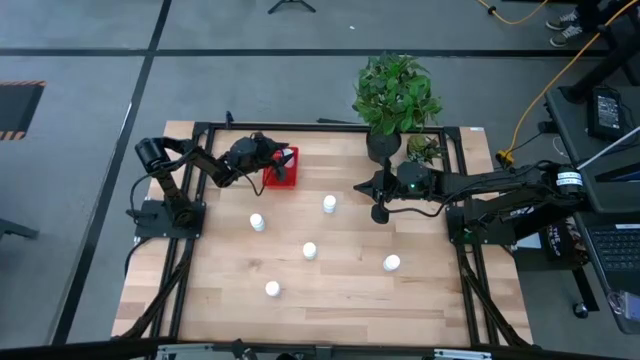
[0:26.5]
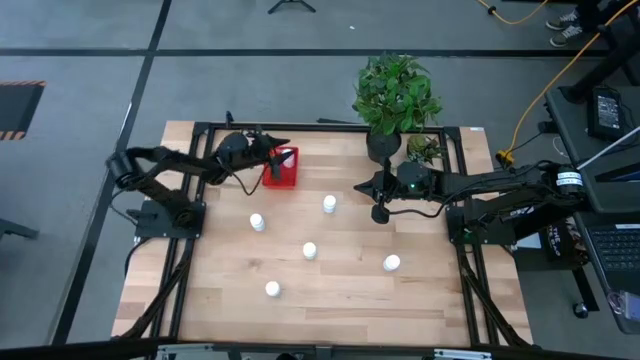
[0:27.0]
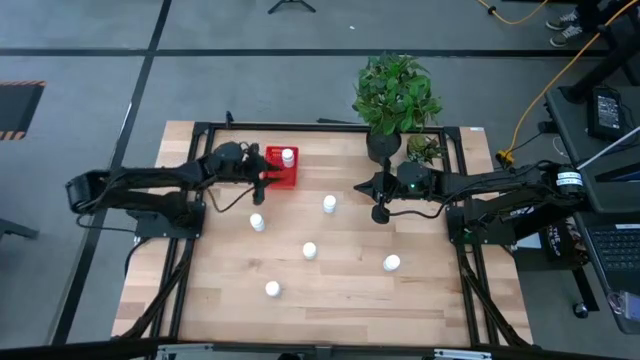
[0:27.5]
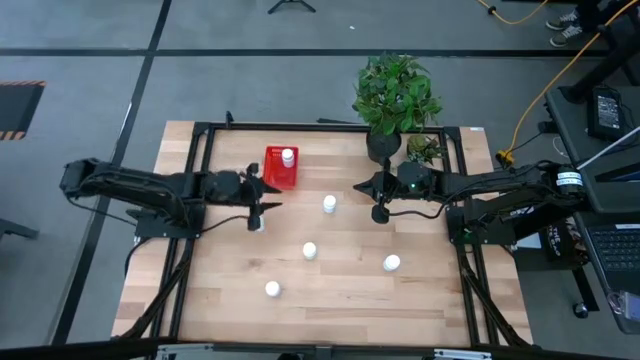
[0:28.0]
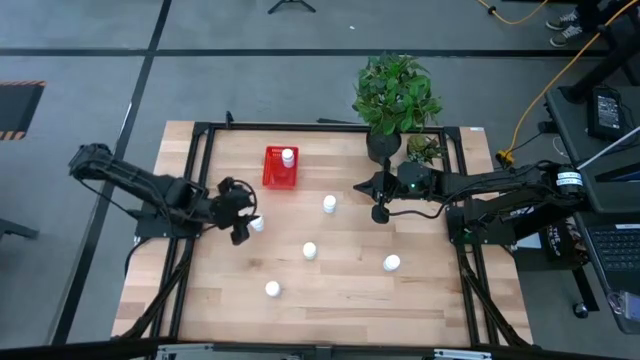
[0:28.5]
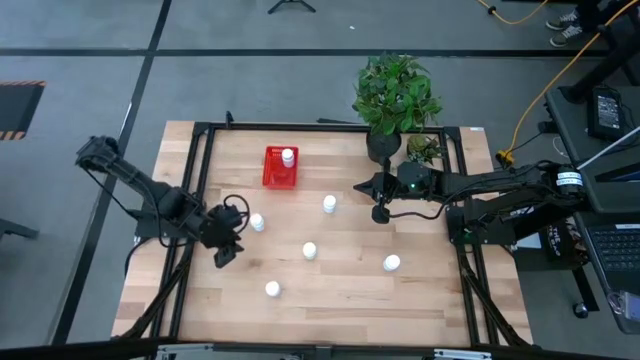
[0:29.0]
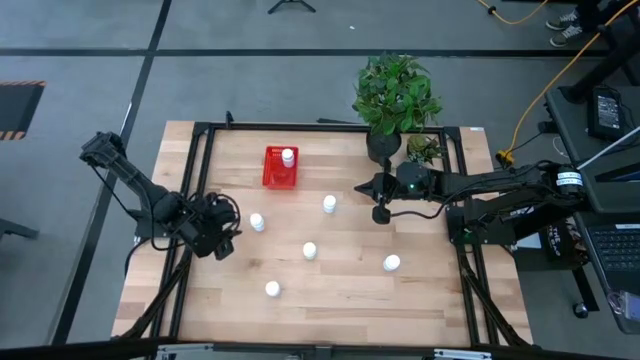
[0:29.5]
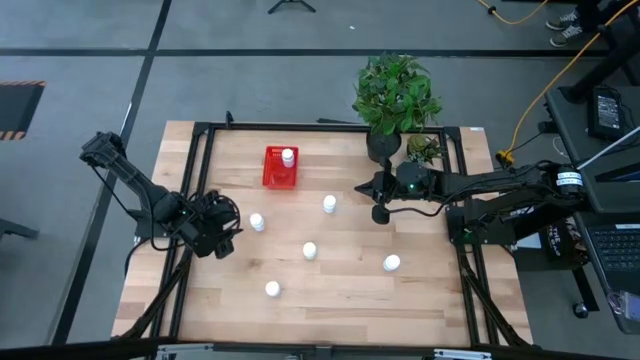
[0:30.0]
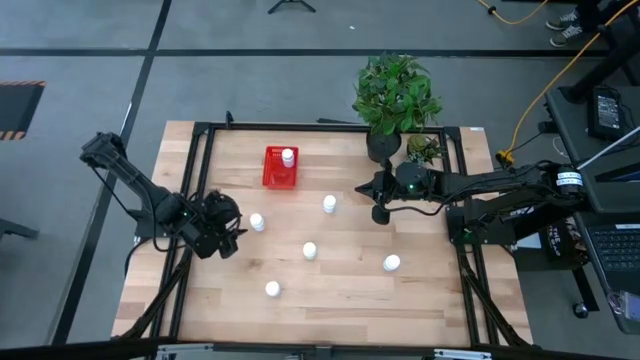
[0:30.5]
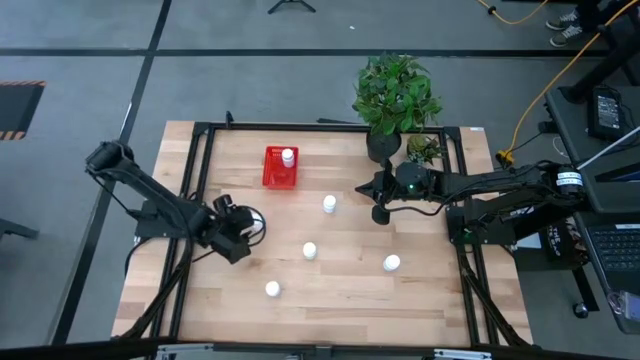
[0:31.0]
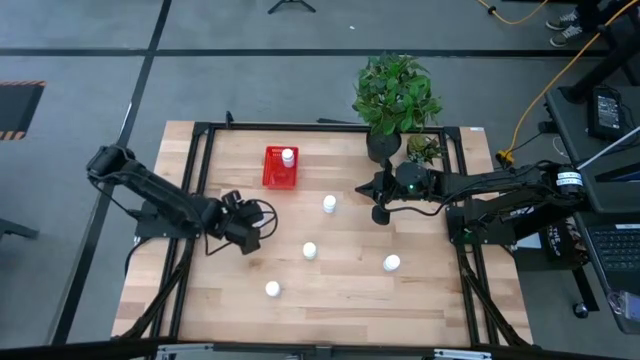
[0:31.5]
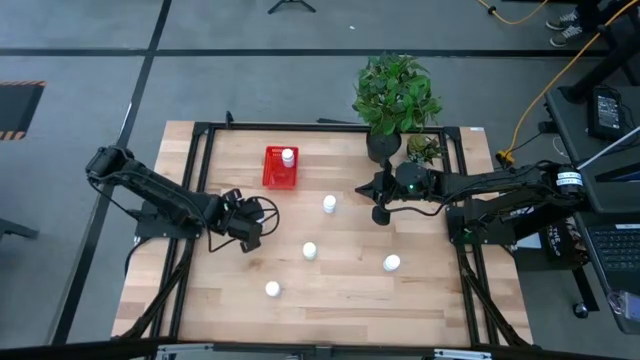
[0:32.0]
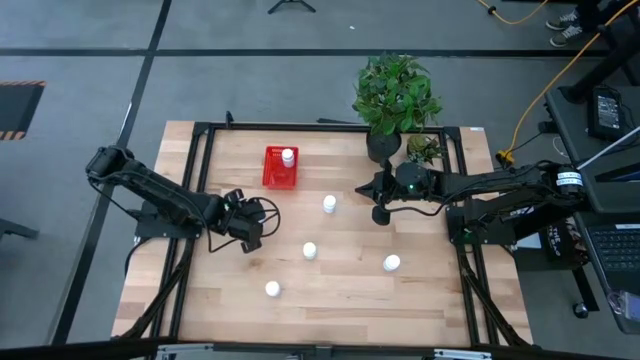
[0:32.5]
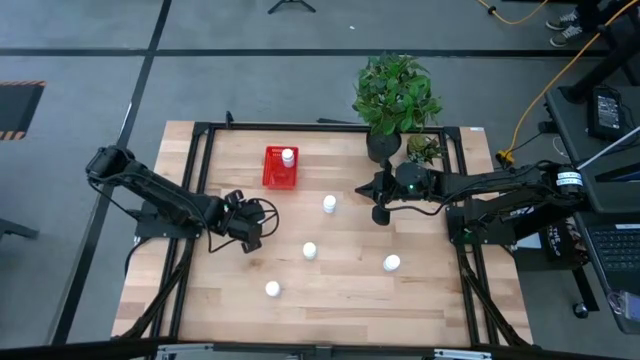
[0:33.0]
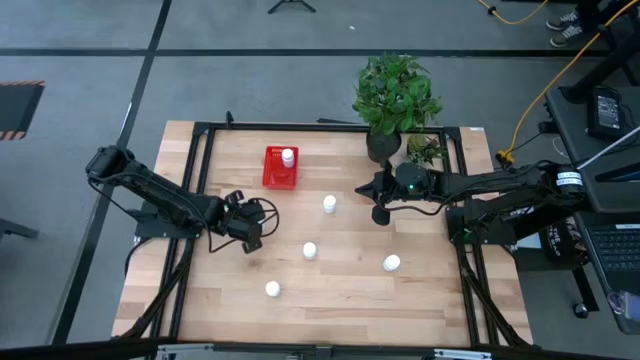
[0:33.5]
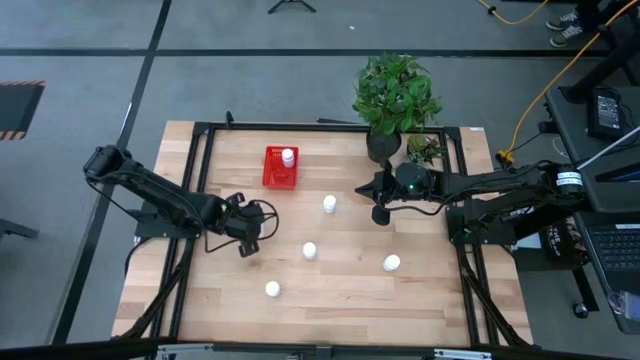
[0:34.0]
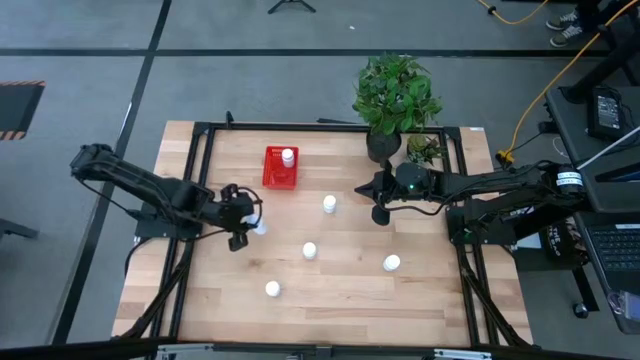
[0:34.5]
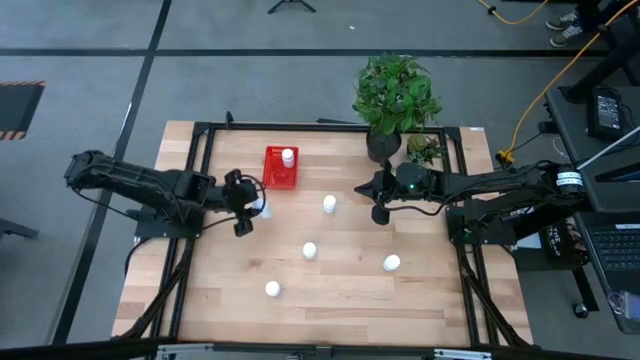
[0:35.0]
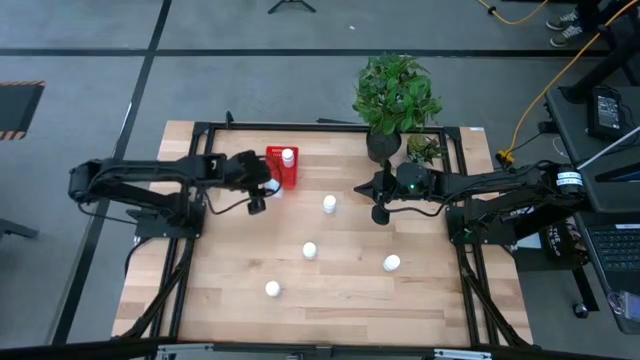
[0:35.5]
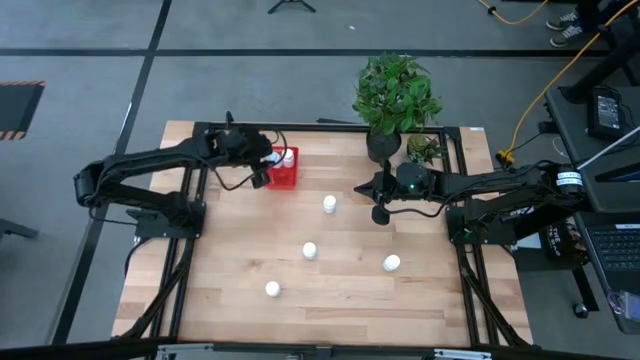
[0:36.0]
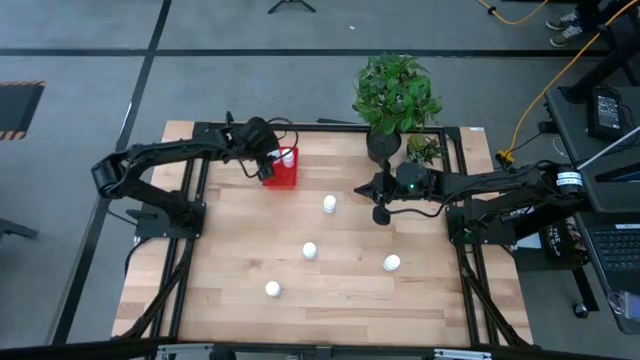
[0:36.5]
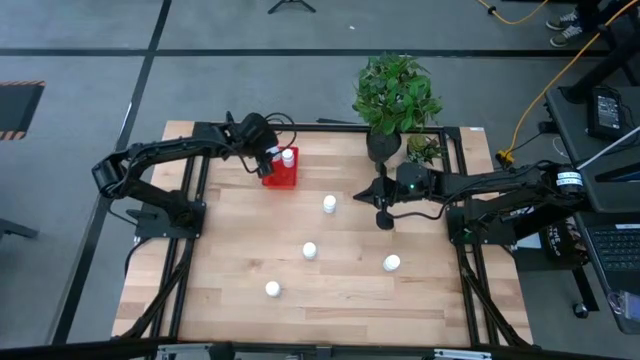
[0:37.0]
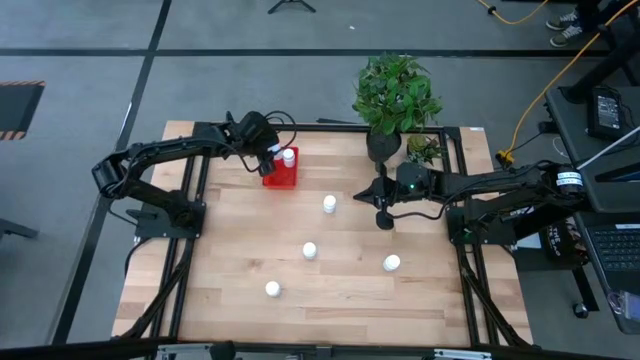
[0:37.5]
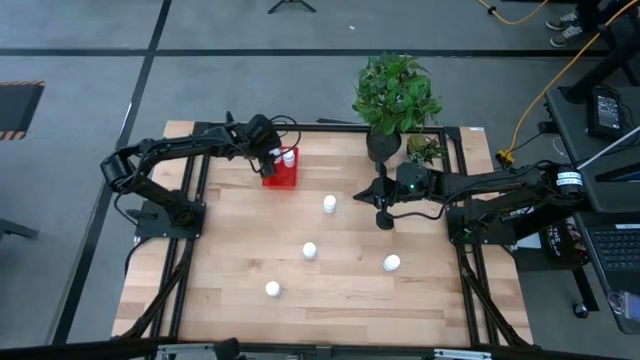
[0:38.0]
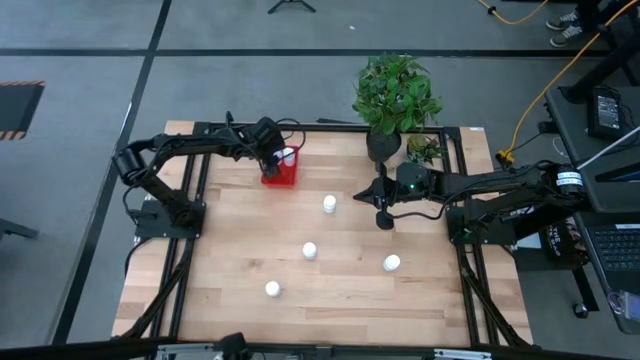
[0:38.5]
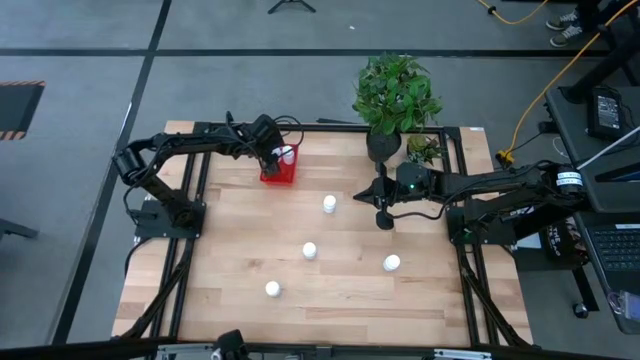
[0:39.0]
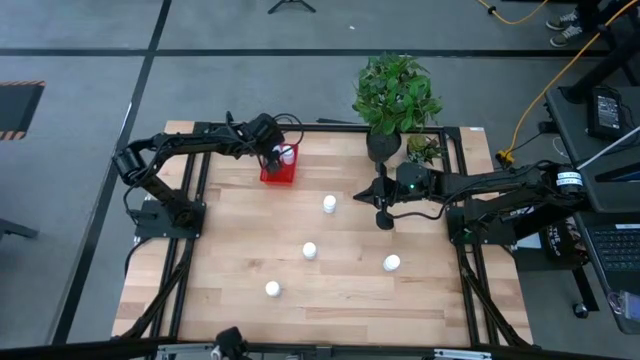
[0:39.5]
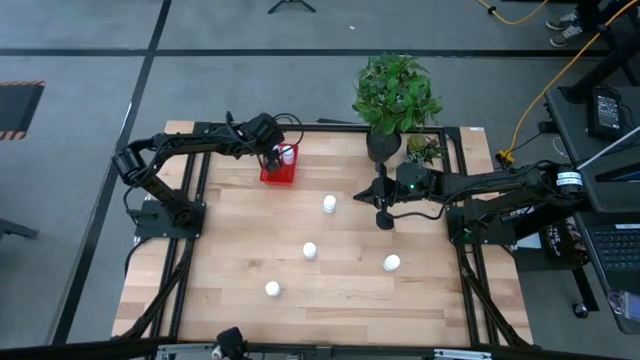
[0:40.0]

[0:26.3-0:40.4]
Task: Pick and place pill bottles into a basket
Put the white pill bottle into the red bin

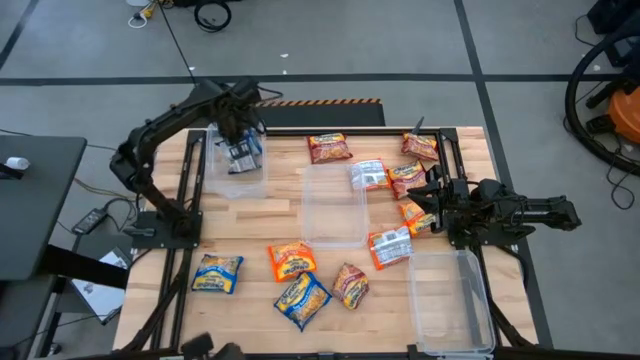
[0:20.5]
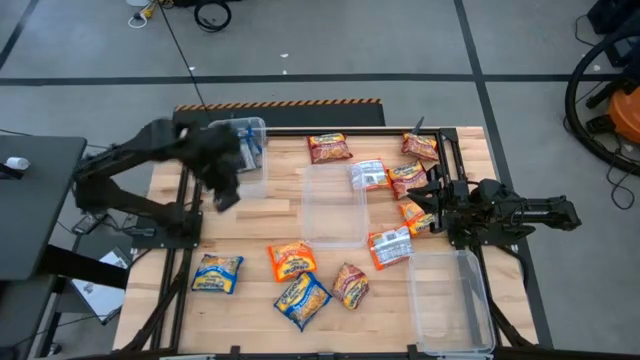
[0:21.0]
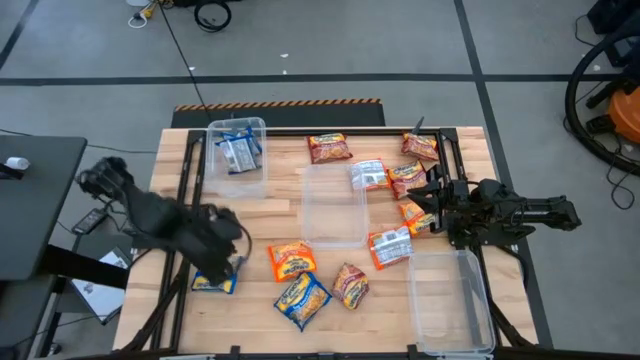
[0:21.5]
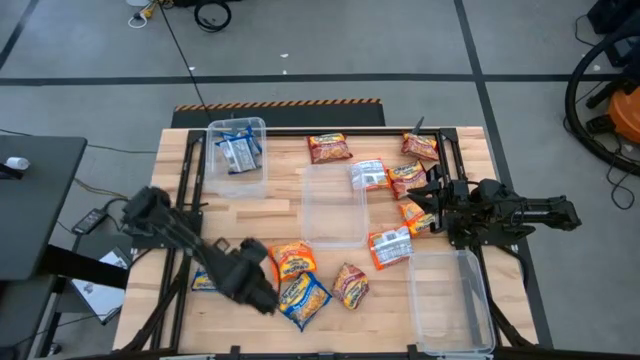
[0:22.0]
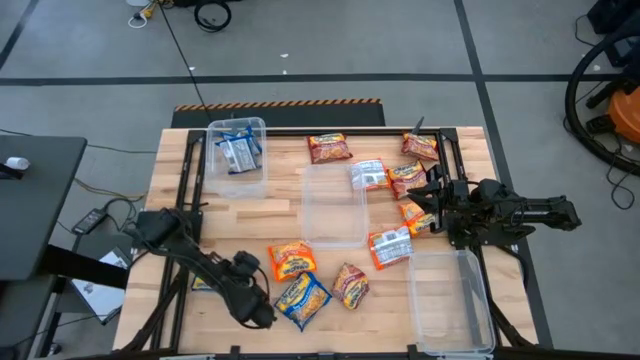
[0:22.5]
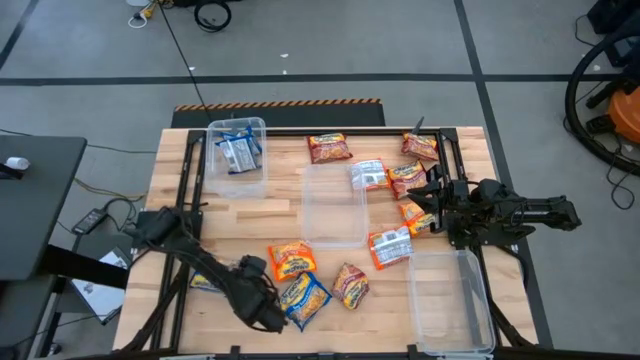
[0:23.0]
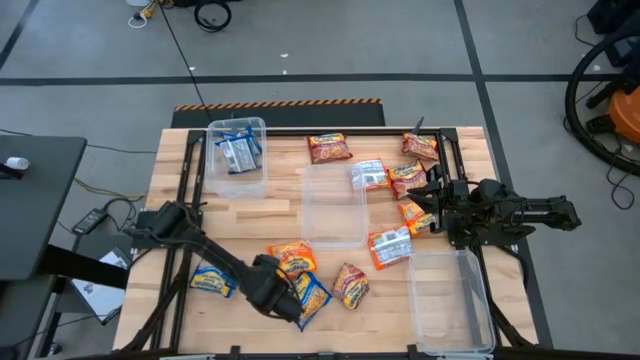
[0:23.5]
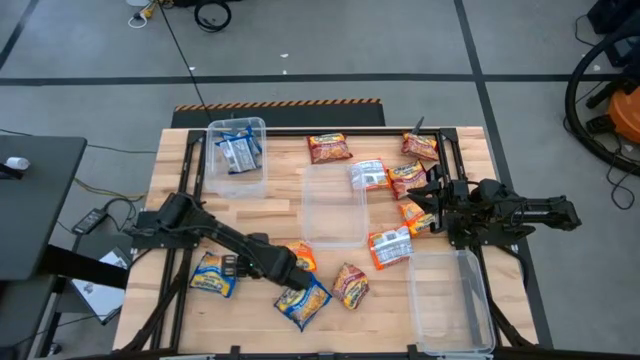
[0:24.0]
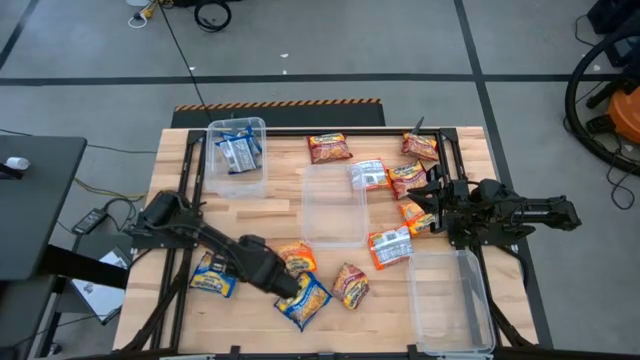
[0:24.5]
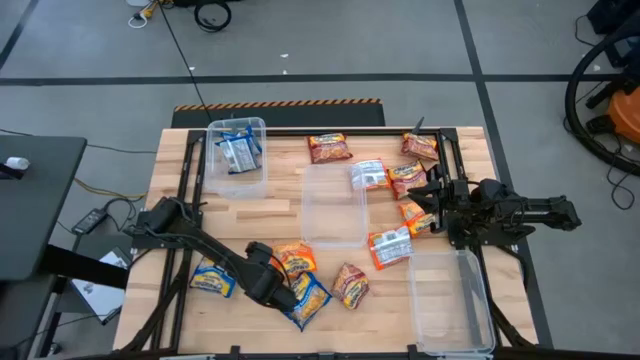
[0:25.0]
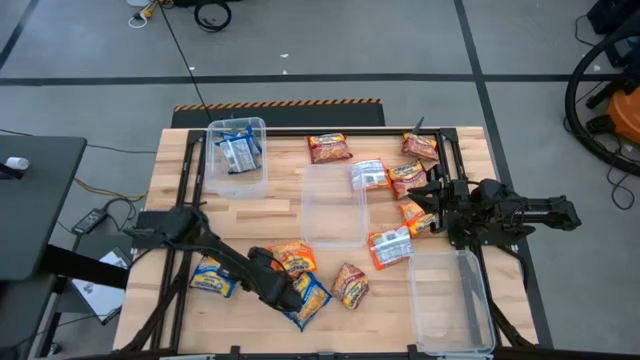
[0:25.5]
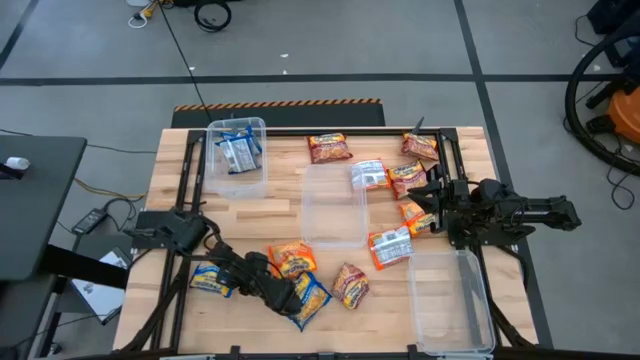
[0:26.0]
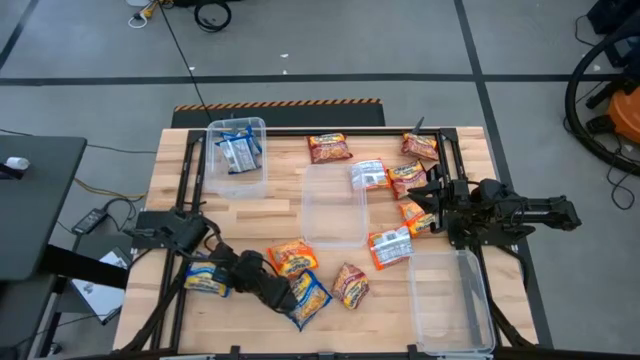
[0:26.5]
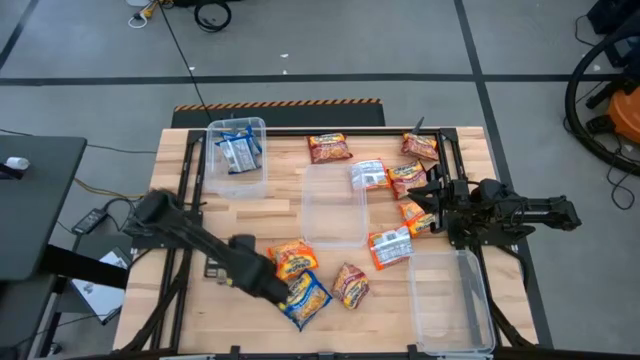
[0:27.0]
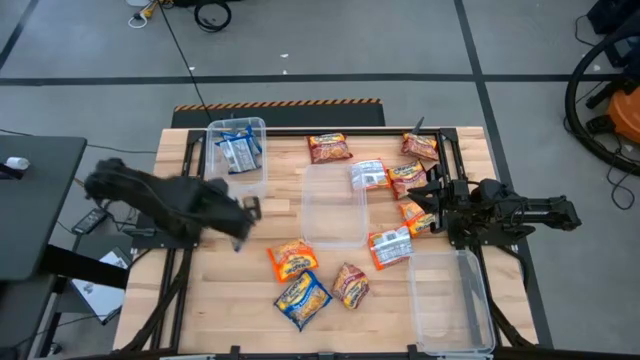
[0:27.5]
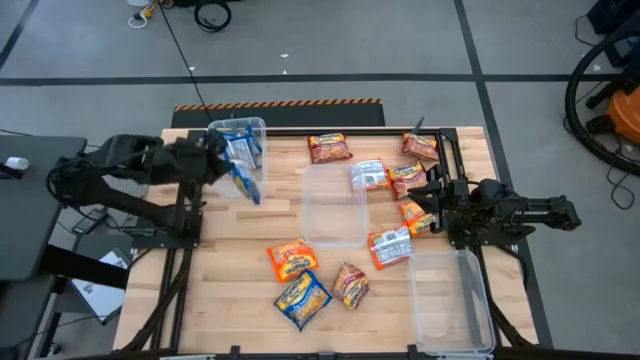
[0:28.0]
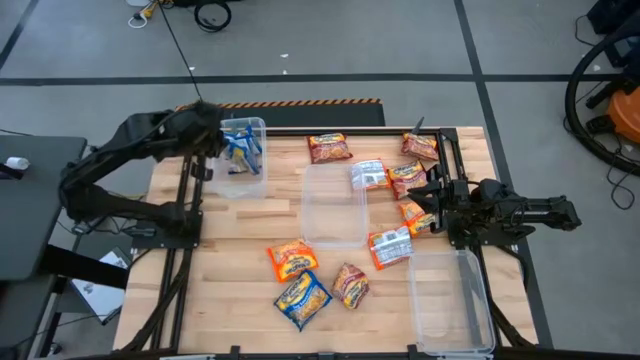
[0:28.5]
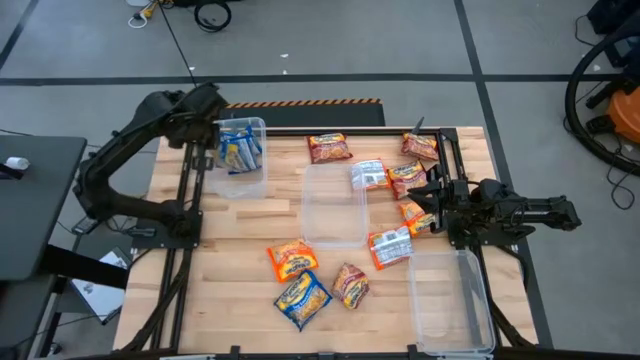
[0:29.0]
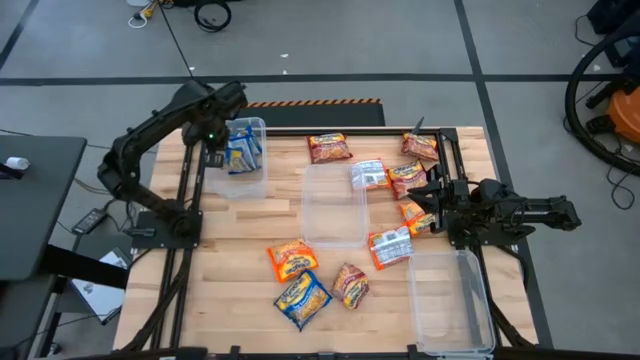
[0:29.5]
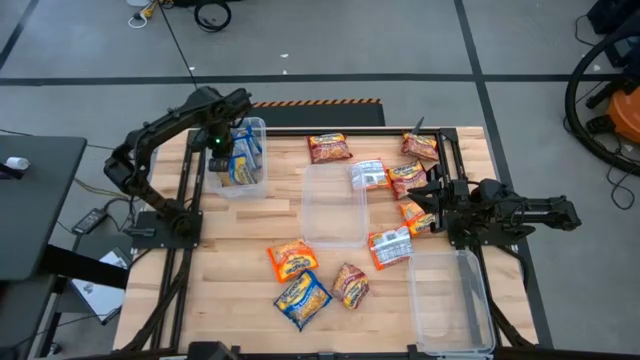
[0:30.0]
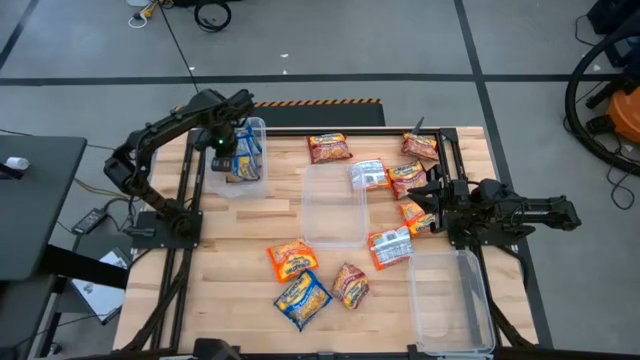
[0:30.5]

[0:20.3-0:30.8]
Task: Sort Maruchan noodles
Put the blue noodle pack into the top transparent bin
